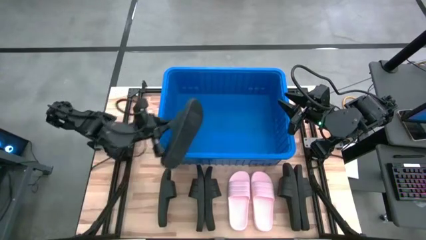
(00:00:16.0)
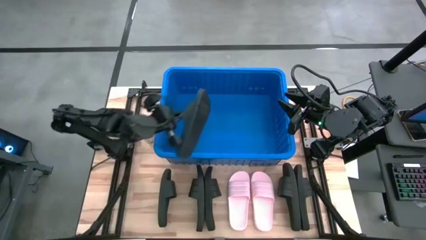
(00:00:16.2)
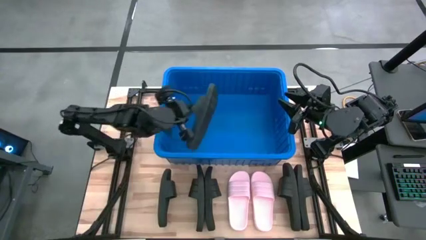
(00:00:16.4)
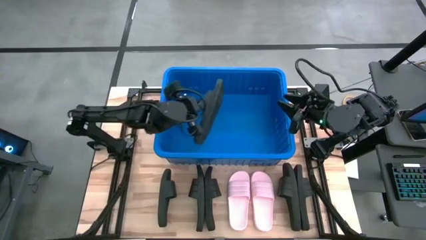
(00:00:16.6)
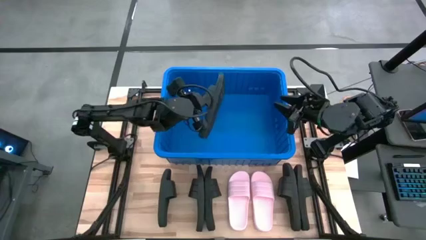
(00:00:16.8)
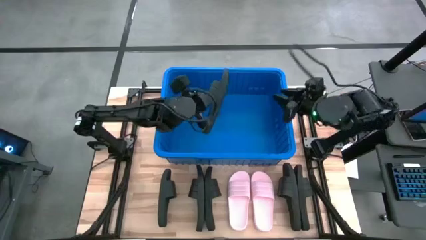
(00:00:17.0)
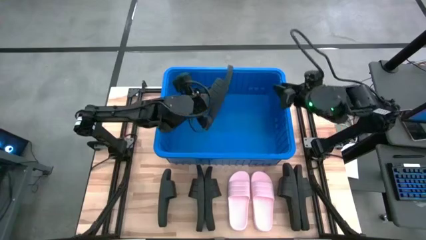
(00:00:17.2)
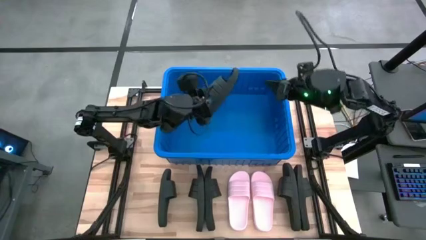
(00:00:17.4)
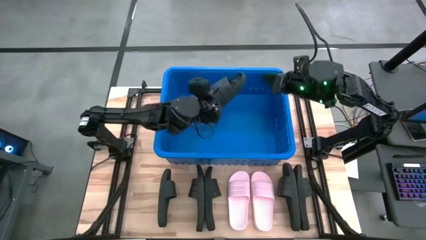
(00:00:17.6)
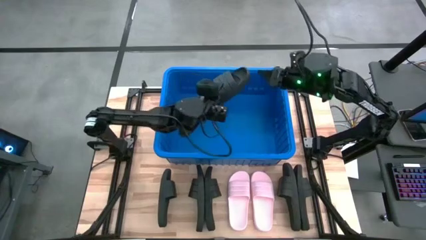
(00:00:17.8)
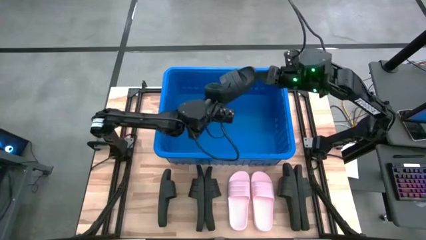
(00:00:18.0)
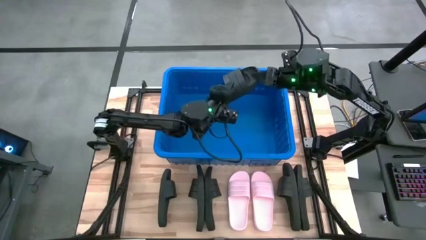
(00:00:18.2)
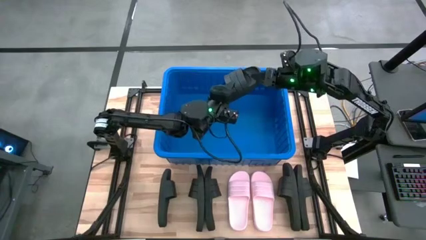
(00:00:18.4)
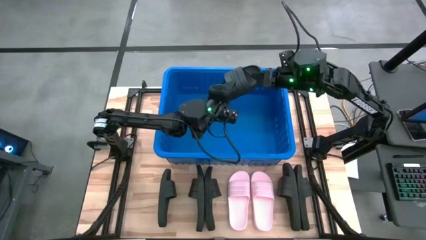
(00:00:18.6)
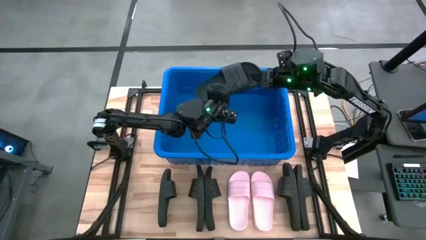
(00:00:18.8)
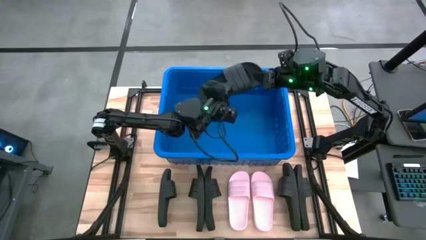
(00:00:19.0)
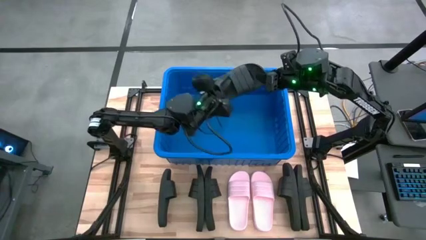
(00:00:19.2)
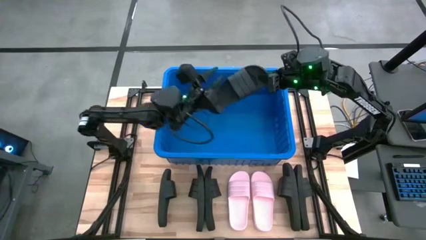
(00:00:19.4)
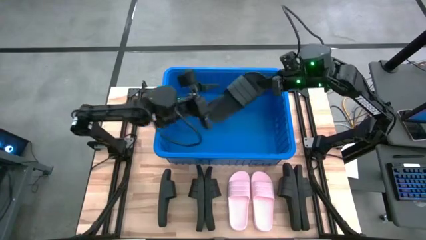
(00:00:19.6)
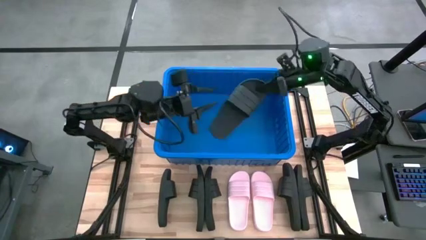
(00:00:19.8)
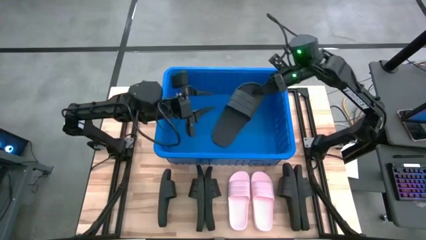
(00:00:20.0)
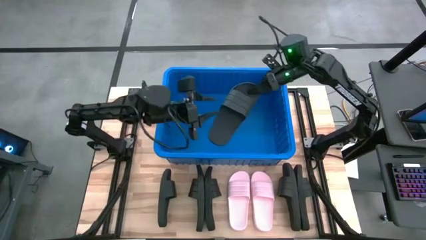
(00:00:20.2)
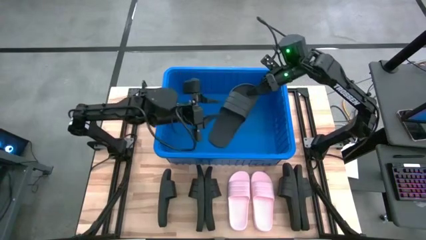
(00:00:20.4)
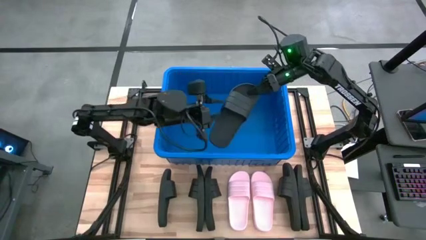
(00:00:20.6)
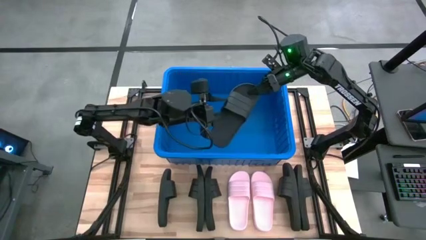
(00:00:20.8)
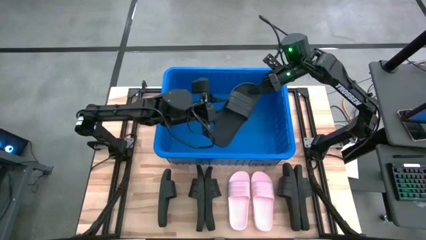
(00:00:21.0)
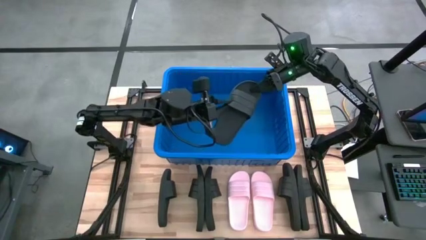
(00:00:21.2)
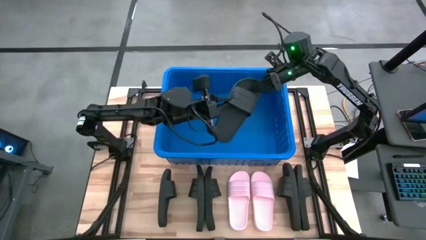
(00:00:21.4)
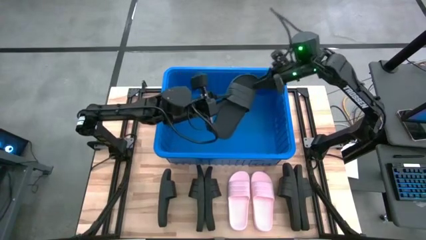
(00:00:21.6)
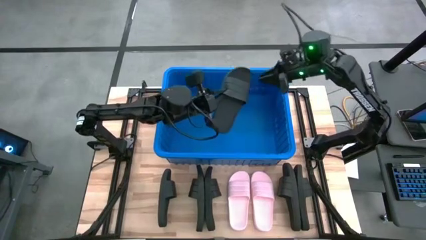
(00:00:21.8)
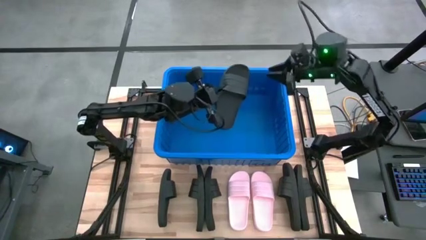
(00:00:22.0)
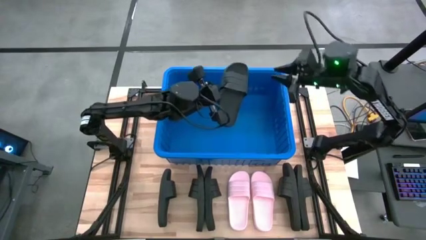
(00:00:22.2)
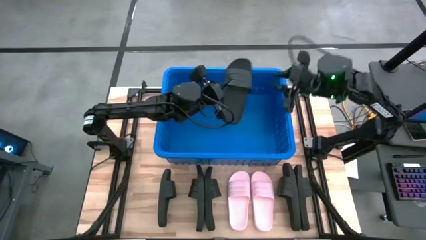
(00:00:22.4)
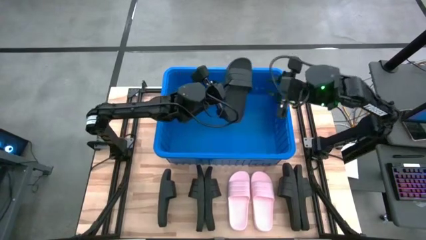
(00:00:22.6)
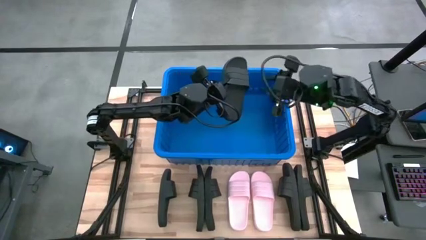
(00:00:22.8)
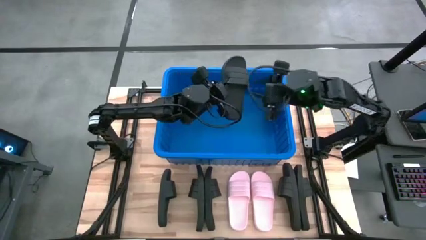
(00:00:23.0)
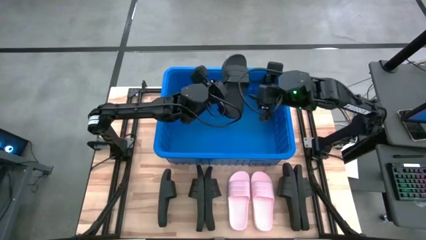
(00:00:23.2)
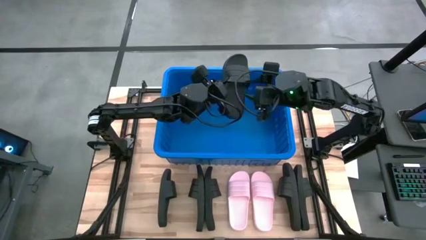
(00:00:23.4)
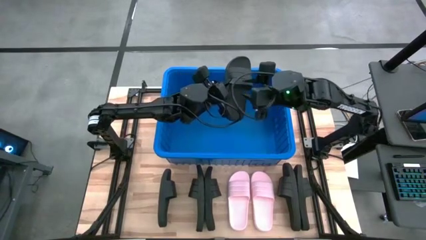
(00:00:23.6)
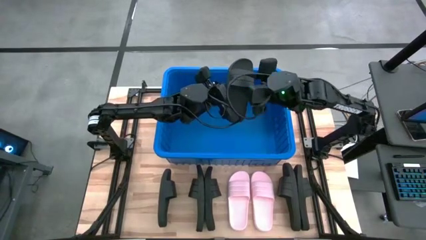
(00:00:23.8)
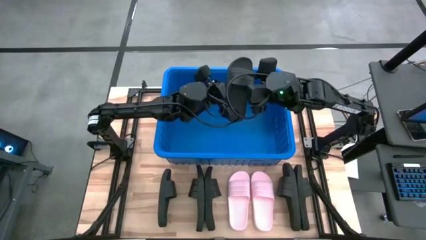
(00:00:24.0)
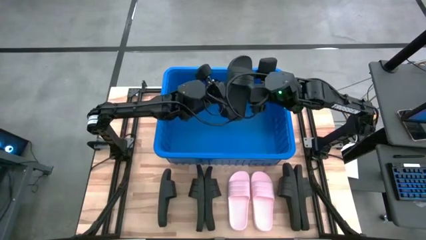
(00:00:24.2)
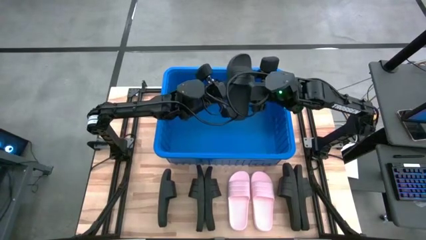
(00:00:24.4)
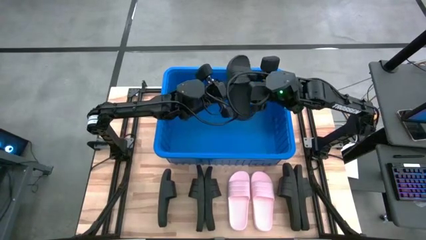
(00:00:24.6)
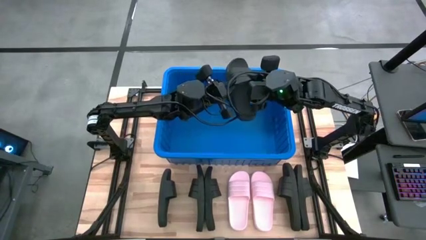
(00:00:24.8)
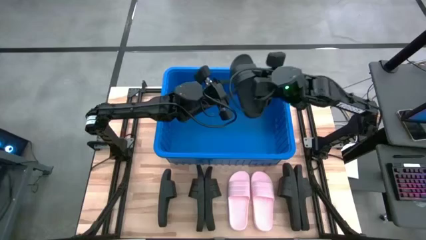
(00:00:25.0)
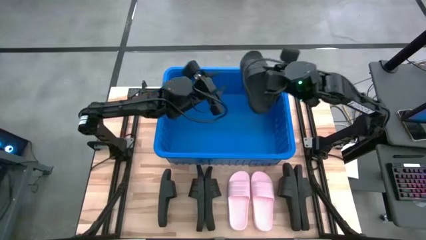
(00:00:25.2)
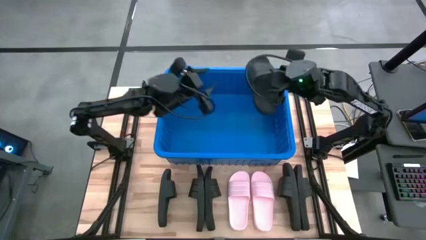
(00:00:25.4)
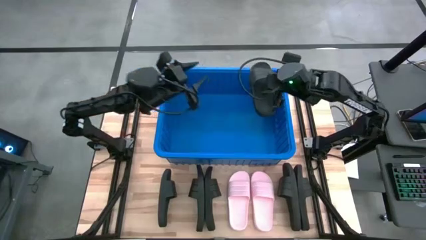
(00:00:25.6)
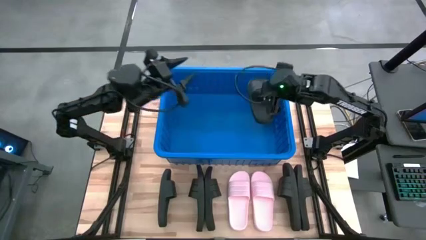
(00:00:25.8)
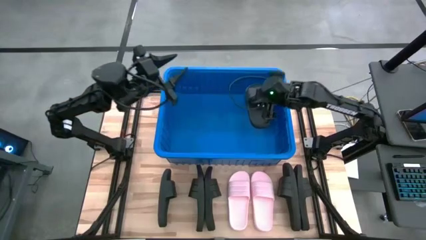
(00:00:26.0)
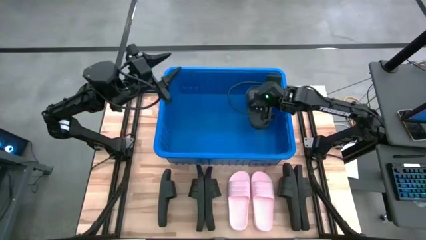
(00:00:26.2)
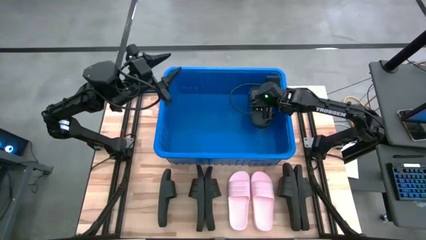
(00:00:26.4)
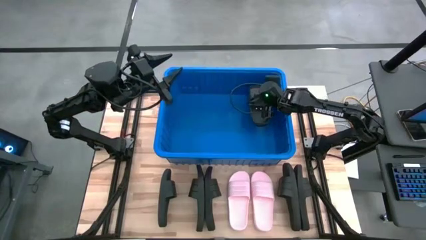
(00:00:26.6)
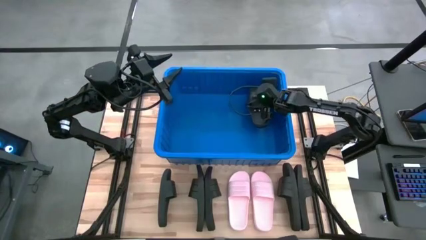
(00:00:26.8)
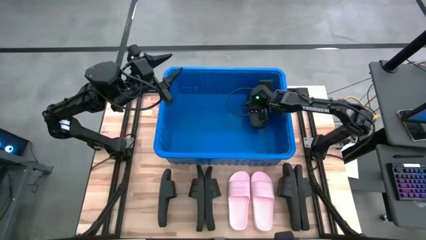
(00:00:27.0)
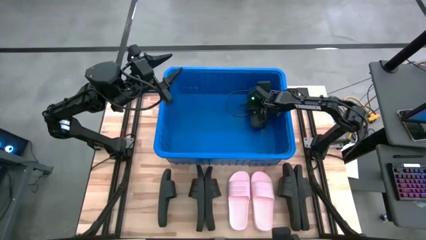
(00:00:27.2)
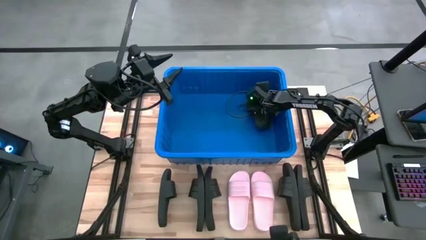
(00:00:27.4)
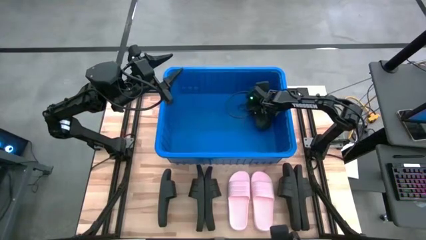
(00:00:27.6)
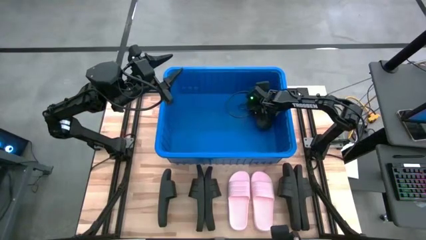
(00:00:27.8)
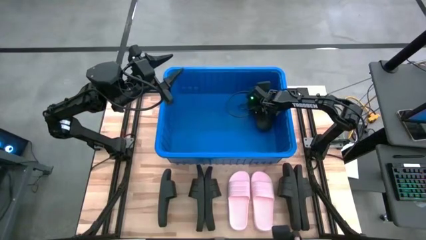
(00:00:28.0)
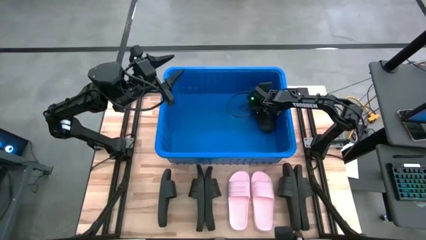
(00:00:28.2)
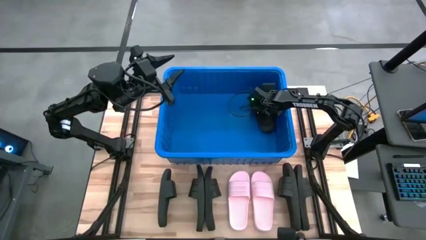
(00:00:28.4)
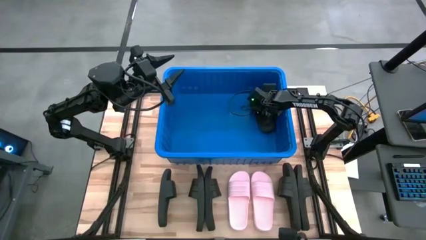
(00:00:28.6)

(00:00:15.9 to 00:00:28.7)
Task: Pick and place slides into bin
Put the black slide into the blue bin
